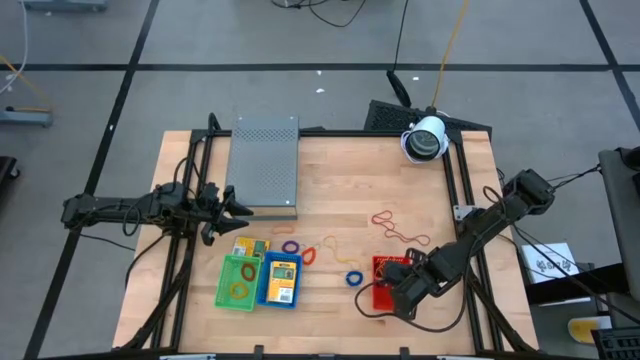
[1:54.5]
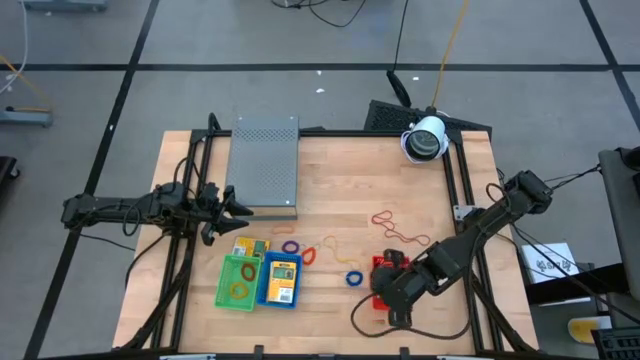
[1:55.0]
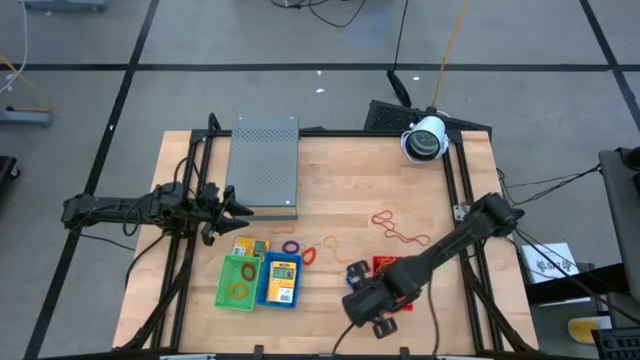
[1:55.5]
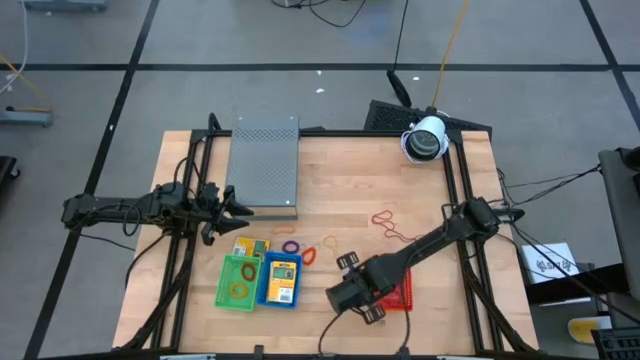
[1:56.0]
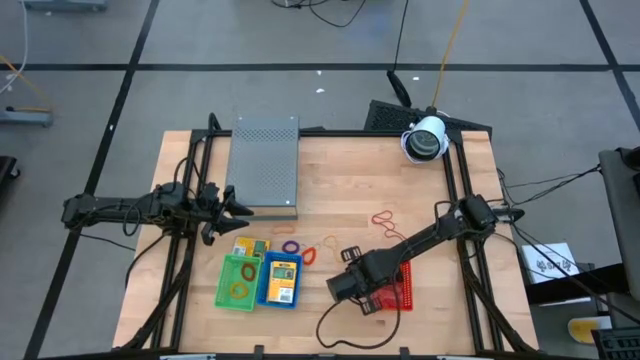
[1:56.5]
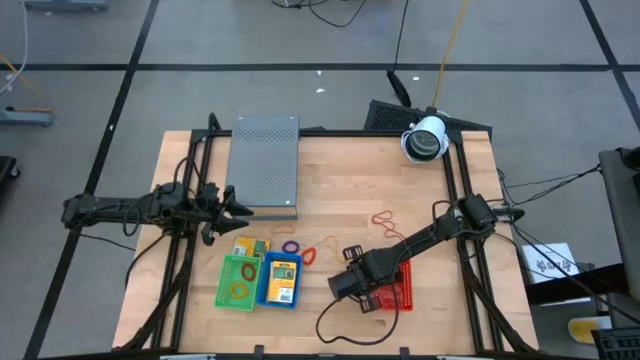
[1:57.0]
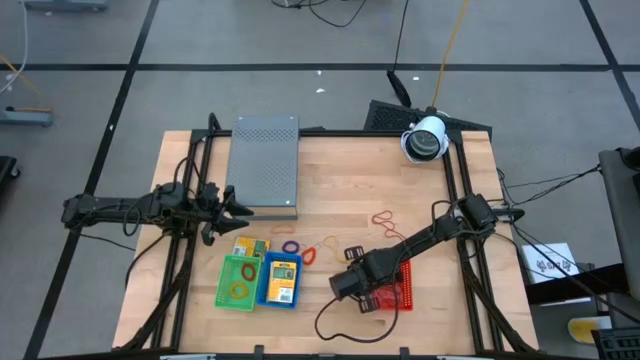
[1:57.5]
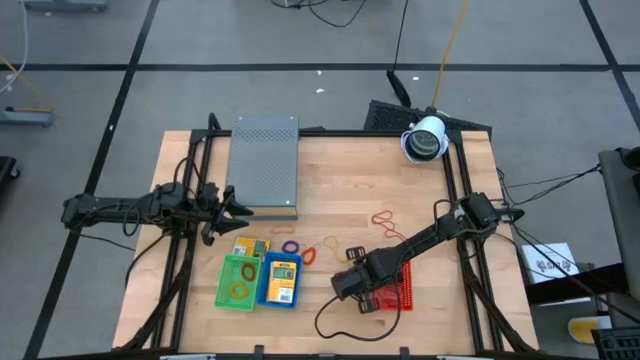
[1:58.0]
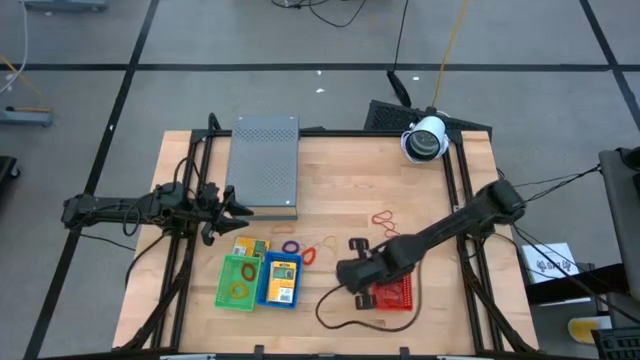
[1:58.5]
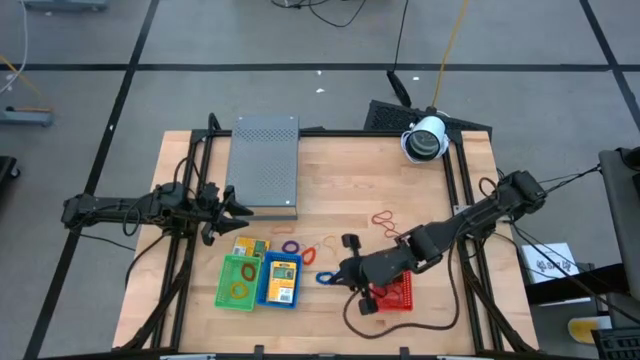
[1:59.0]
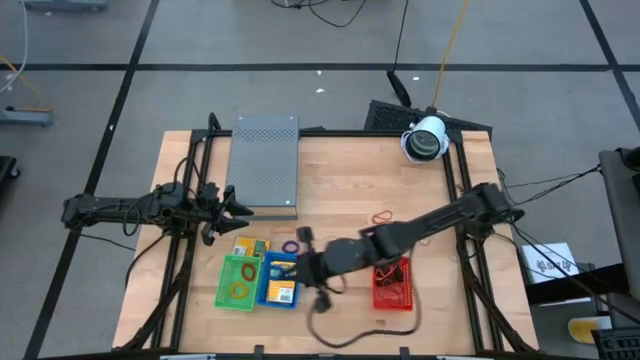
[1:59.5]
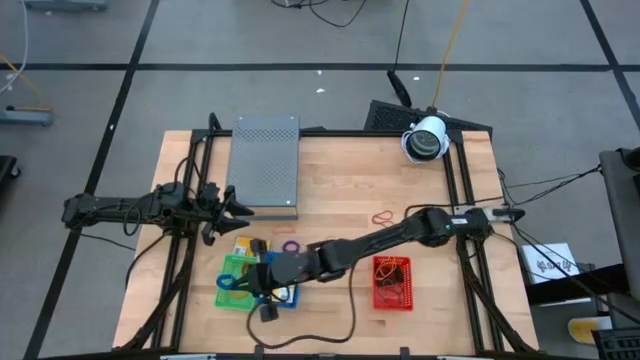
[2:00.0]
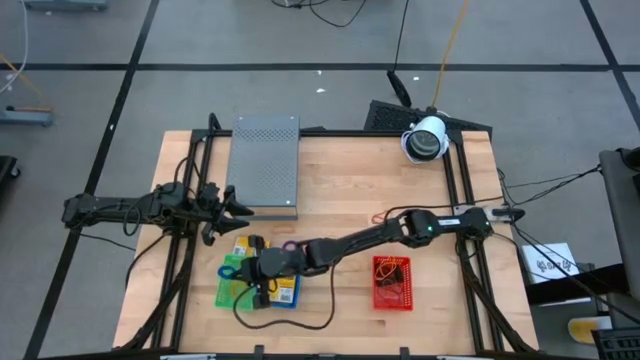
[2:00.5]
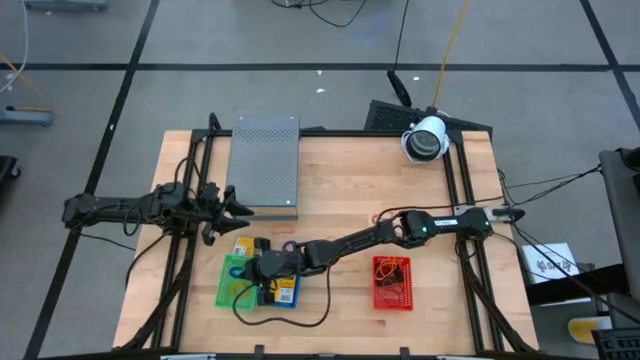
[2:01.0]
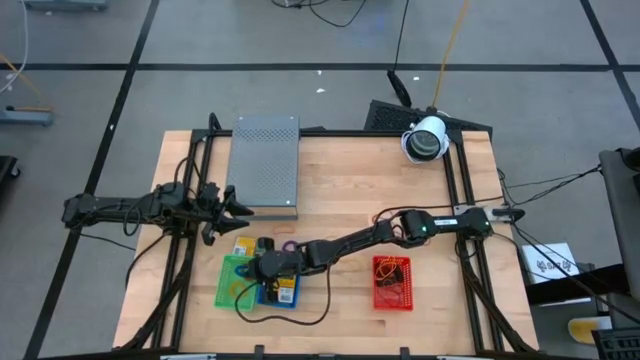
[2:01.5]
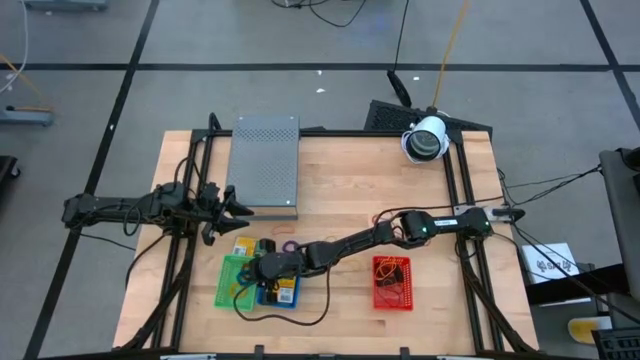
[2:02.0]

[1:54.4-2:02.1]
Task: Pick & Place Office Desk Supplies
Put the blue spring rubberband into the green bin

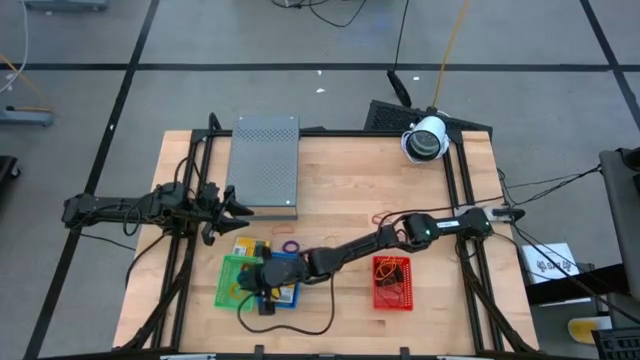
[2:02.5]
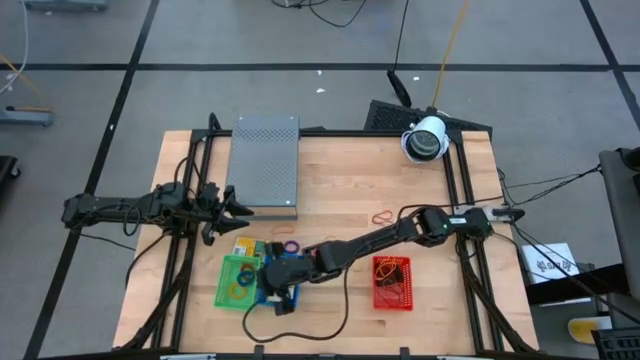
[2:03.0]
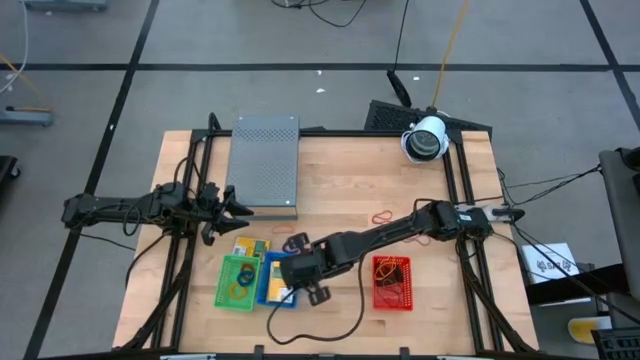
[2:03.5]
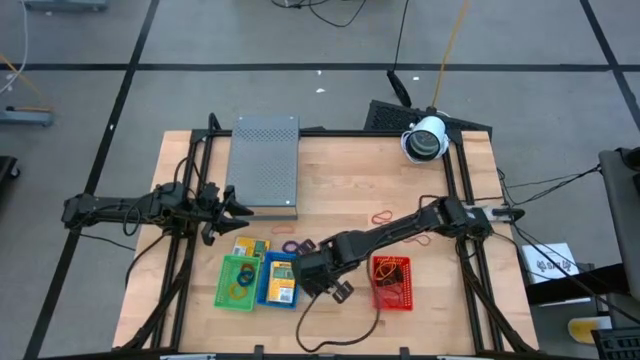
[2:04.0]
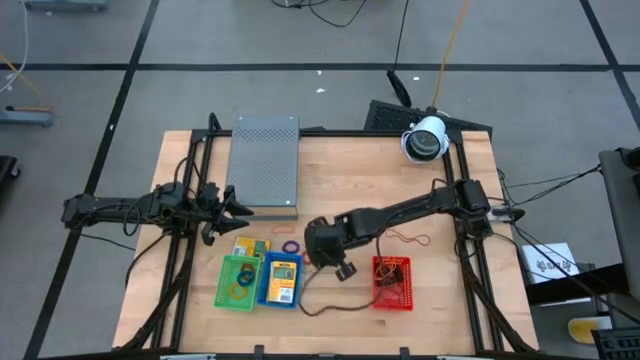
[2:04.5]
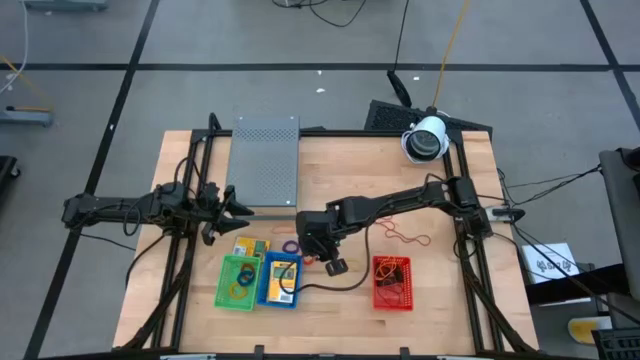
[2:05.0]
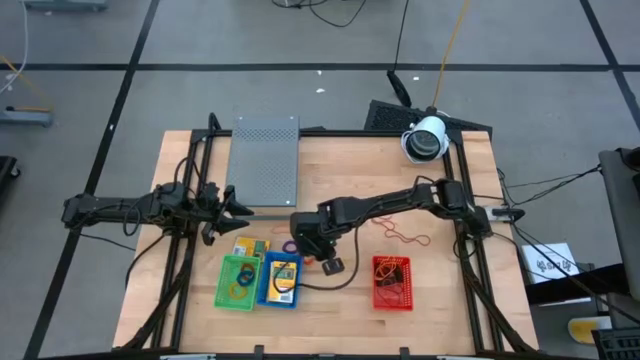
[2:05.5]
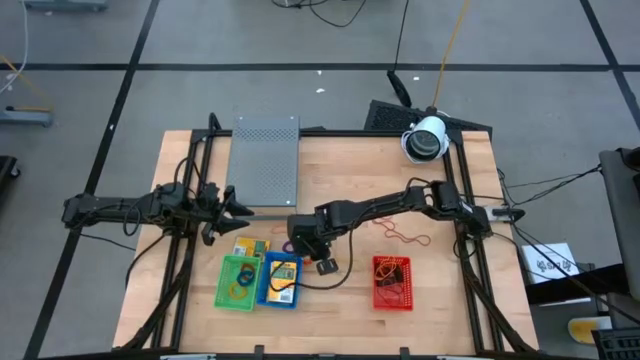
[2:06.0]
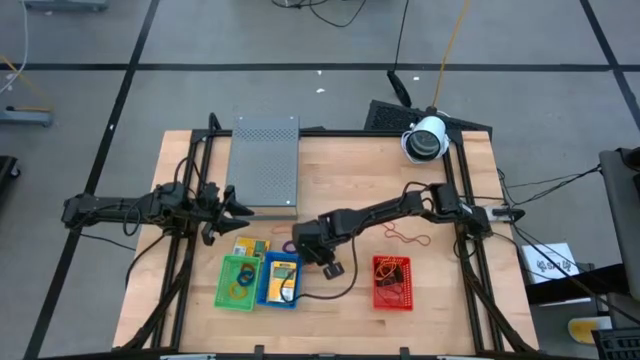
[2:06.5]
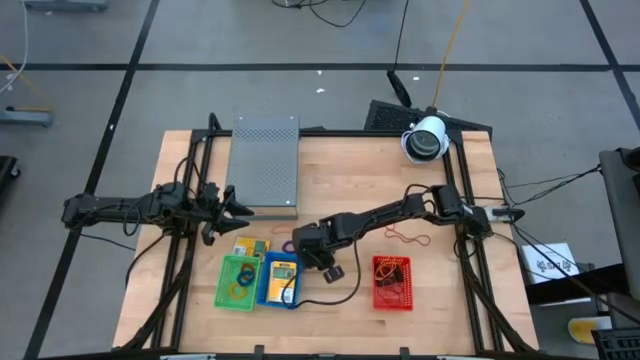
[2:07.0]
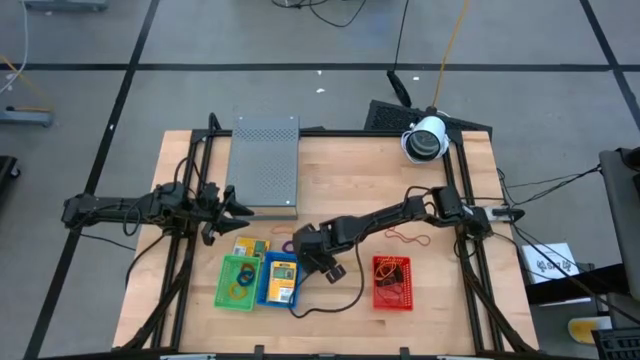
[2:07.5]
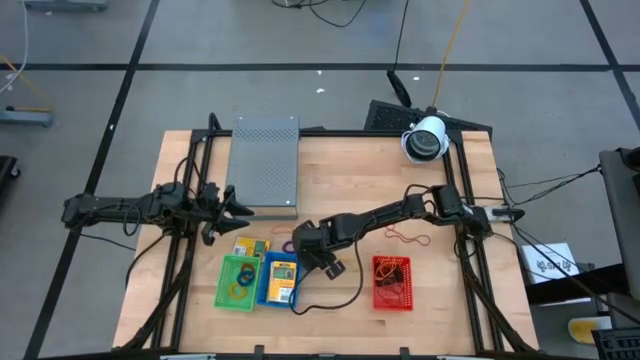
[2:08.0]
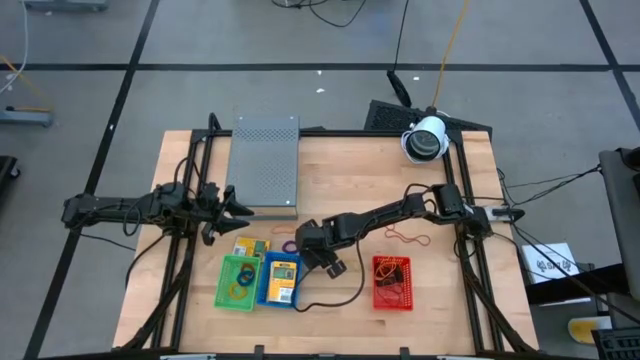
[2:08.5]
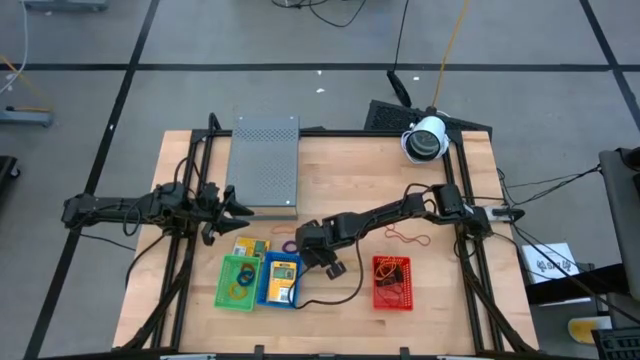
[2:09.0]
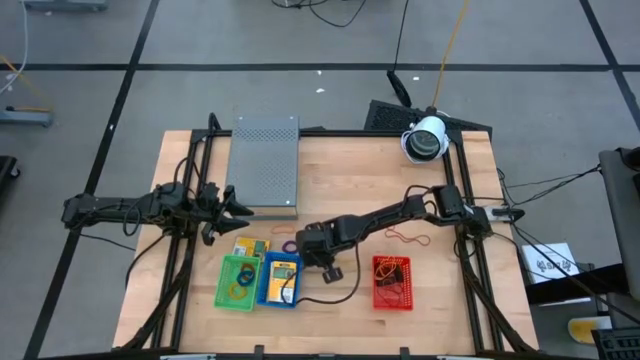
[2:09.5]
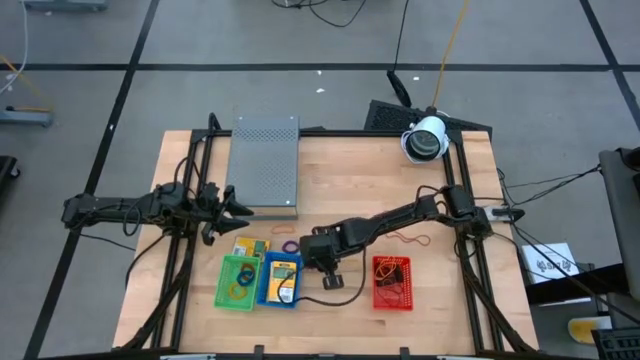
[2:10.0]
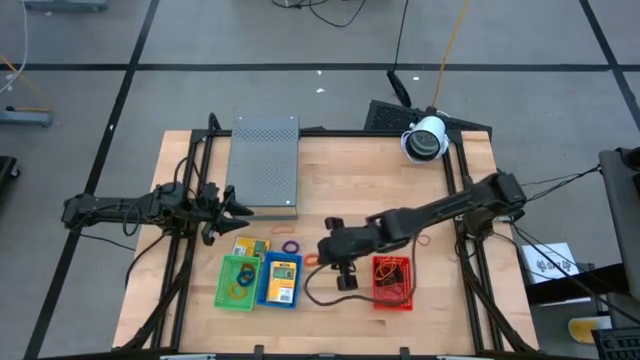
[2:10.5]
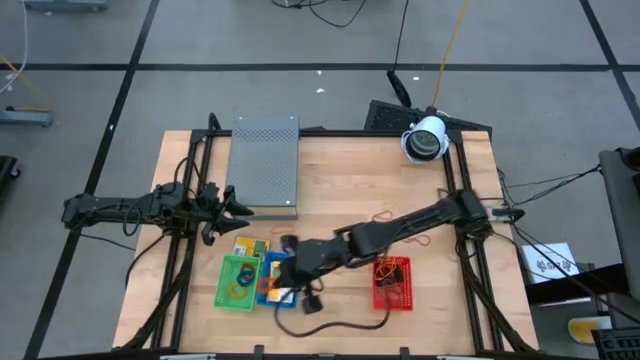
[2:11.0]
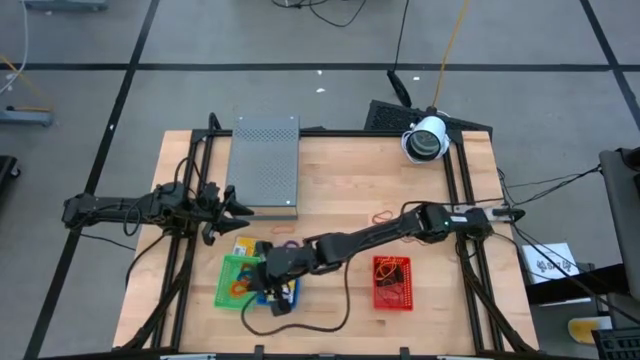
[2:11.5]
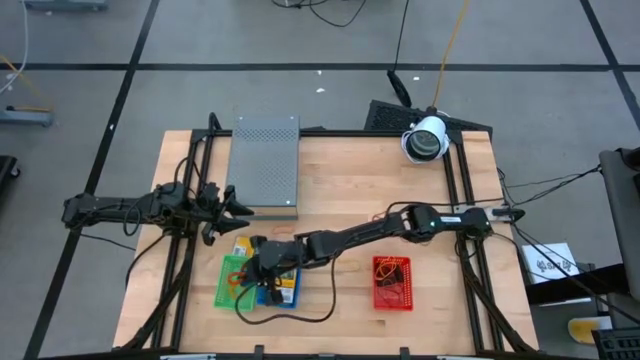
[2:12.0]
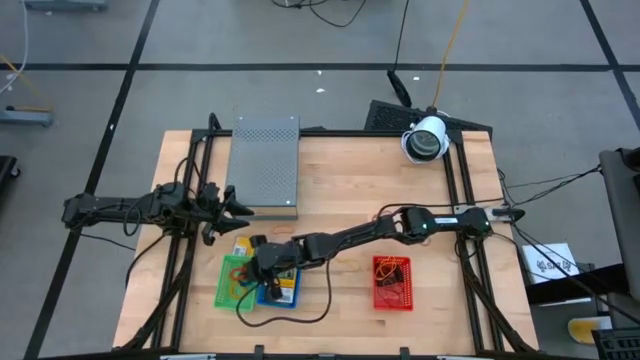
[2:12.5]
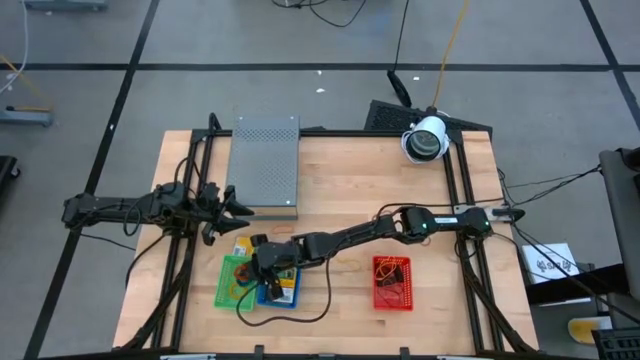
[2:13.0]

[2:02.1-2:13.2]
Put the orange spring rubberband into the green bin

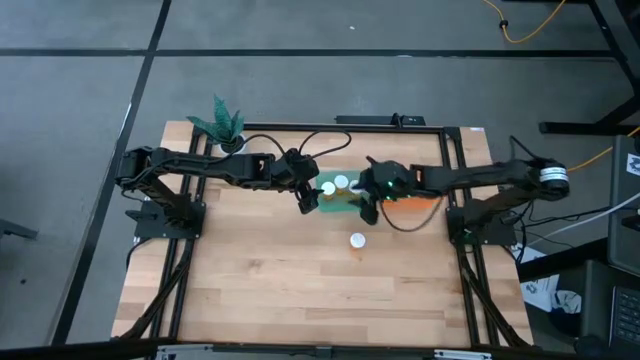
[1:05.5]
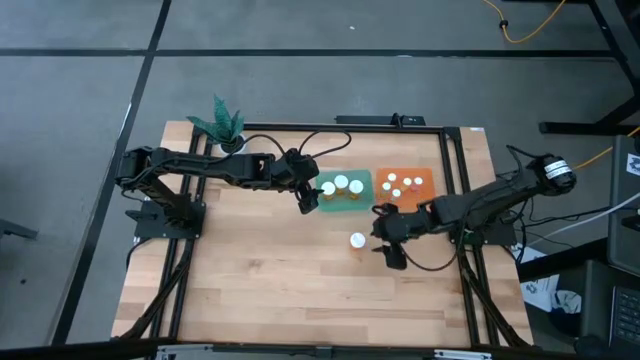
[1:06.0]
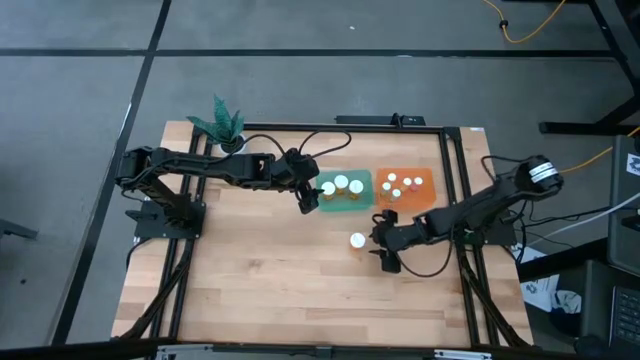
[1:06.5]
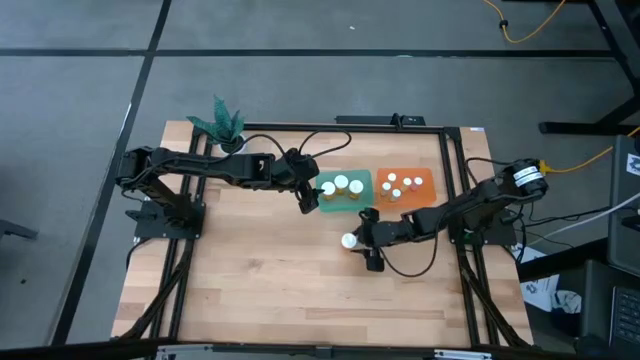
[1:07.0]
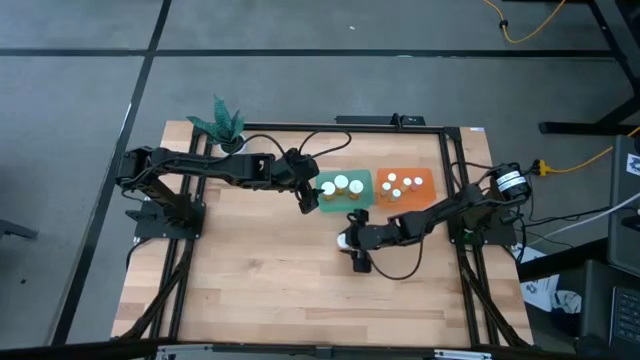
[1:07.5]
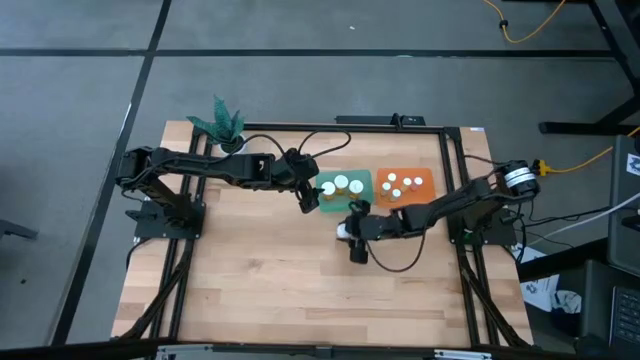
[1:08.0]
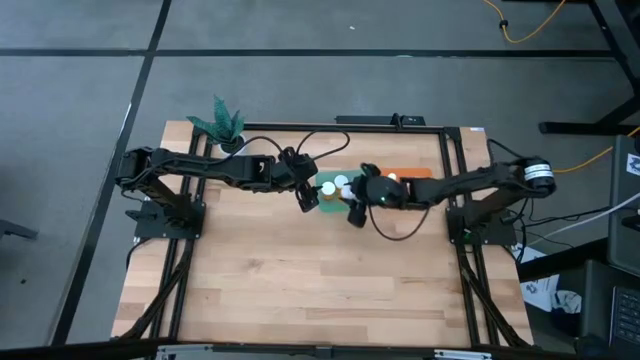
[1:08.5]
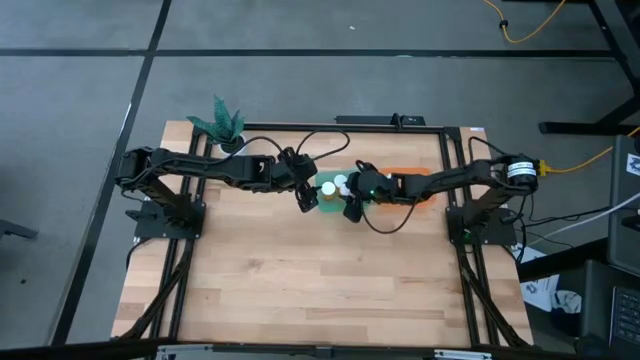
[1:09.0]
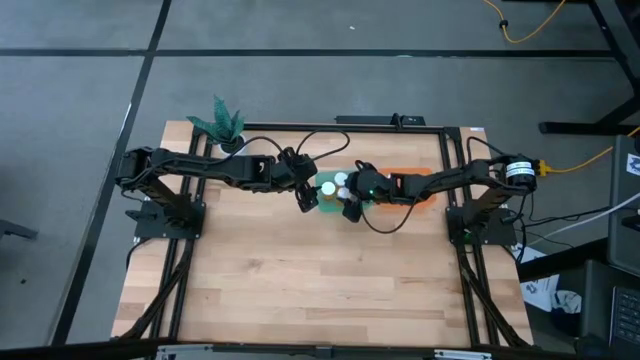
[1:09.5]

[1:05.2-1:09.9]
Task: Pick and place medicine bottles into bin by pill shape (circle, oval)
Put the orange pill bottle into the green bin
